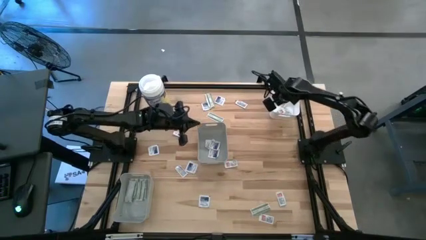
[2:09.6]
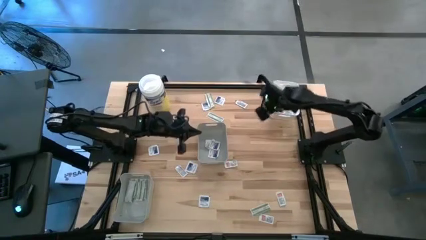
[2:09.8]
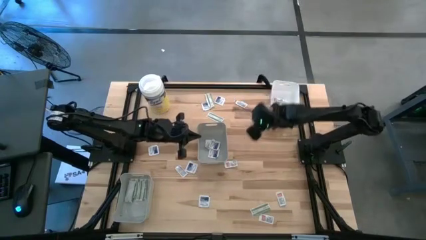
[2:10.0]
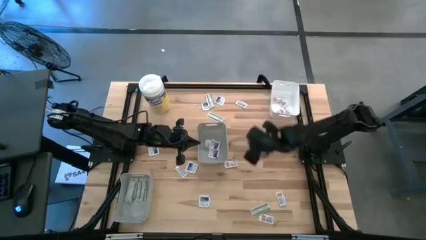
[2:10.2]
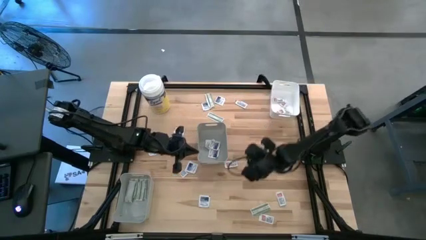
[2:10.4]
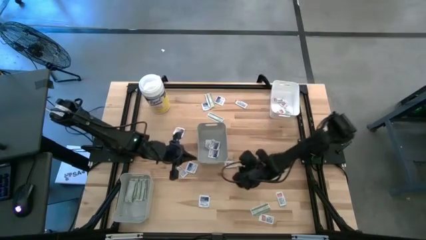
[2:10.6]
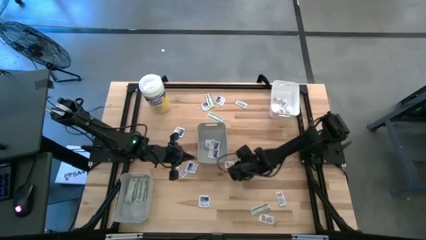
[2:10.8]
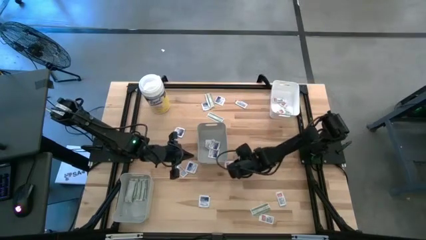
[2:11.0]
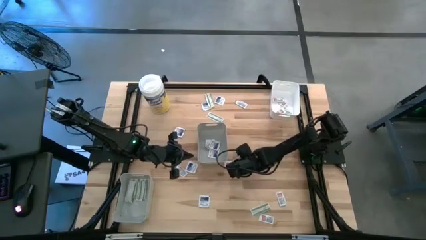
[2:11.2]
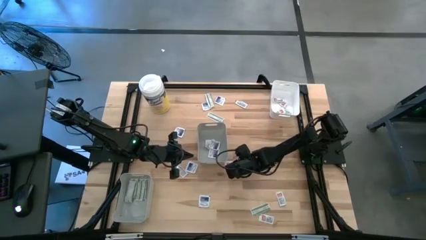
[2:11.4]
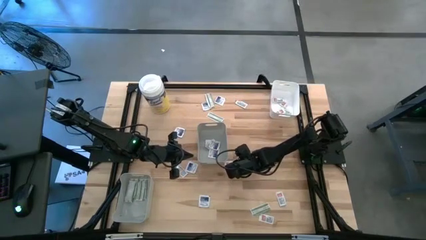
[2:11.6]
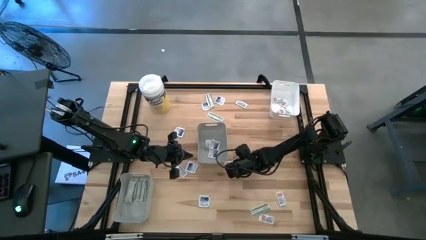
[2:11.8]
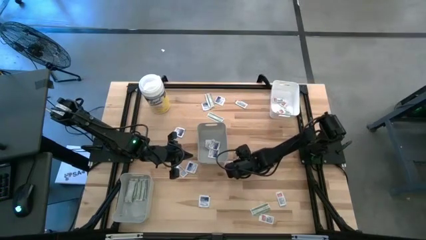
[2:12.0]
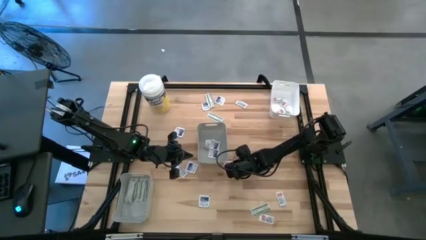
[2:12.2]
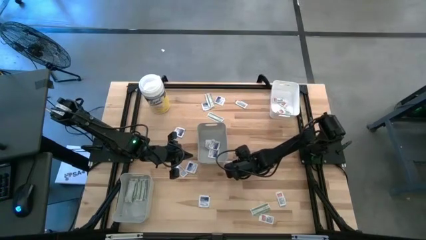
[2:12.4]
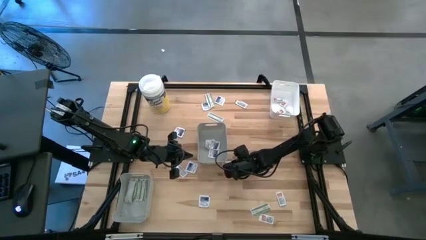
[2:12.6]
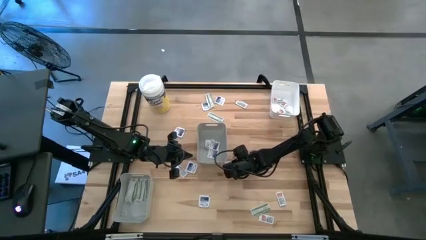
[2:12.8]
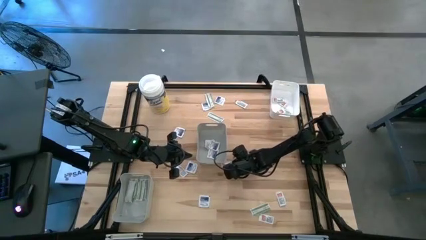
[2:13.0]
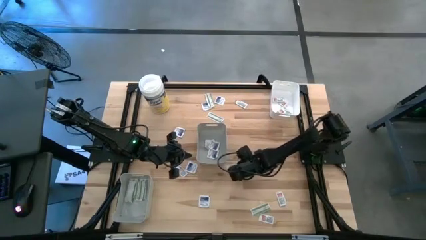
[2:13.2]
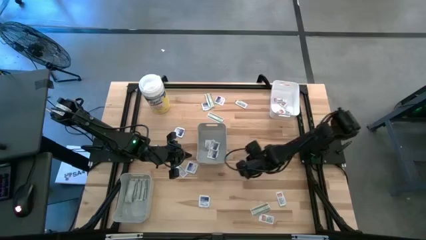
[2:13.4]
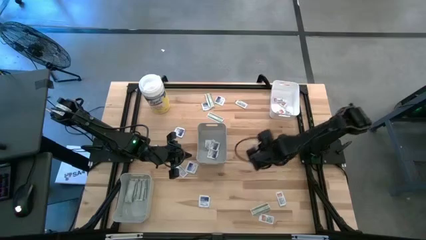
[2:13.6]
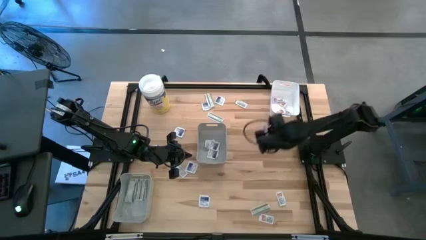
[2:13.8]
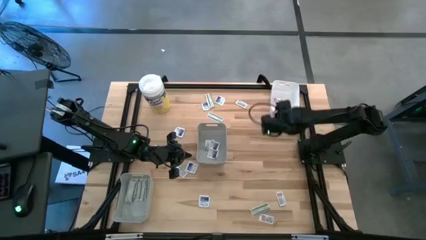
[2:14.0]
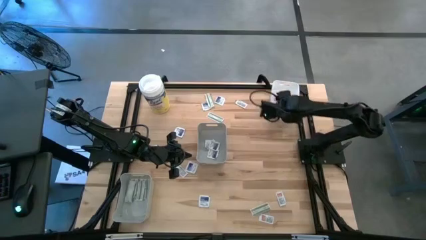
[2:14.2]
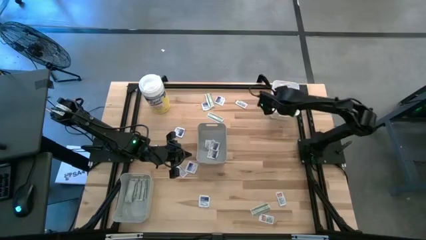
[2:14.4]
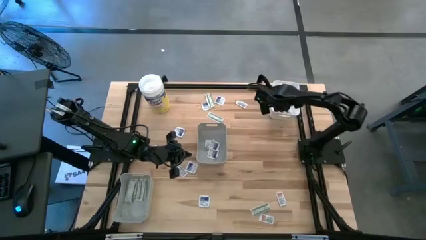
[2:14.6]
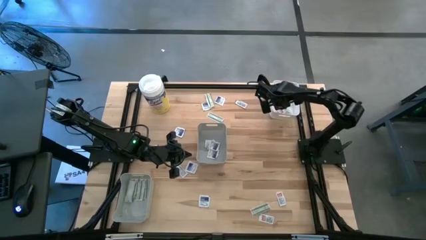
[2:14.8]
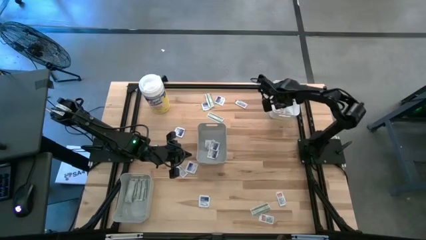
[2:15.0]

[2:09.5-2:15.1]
Task: Pick & Place First Aid Supplies
Put the orange pad into the white bin

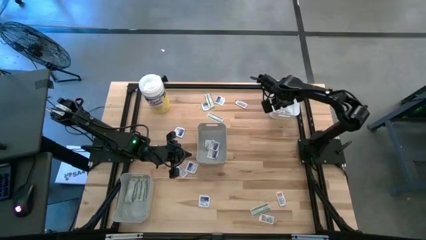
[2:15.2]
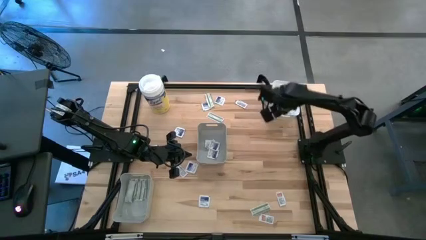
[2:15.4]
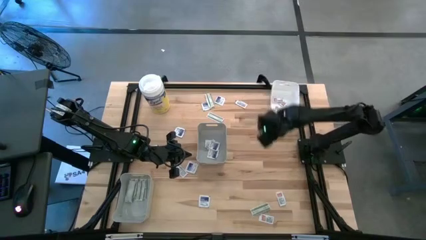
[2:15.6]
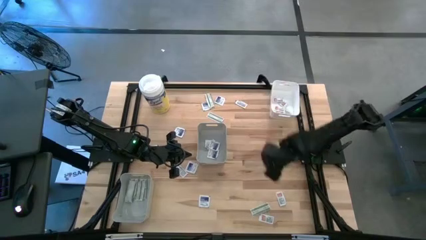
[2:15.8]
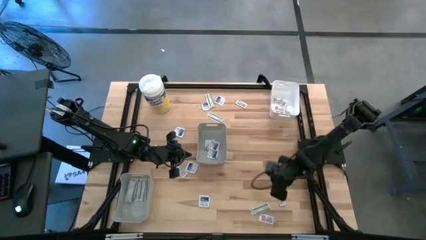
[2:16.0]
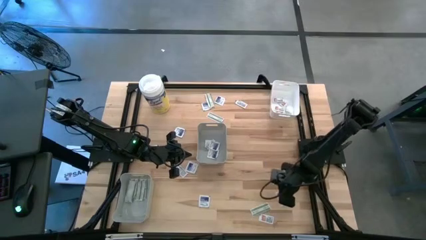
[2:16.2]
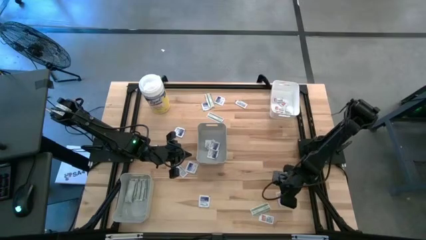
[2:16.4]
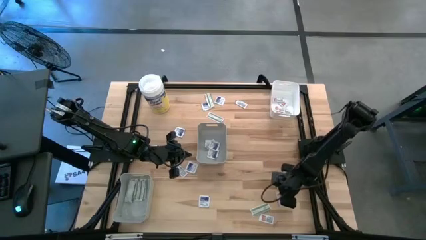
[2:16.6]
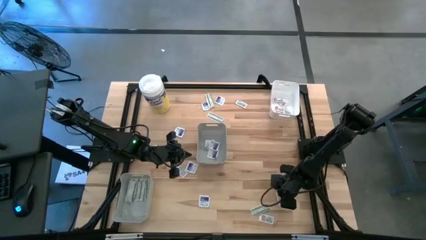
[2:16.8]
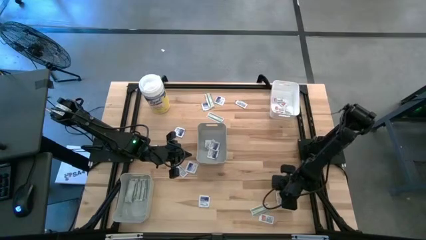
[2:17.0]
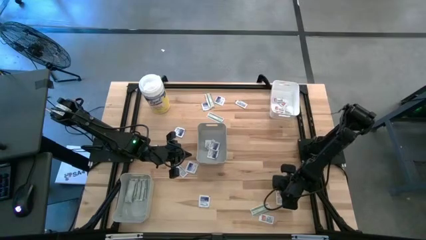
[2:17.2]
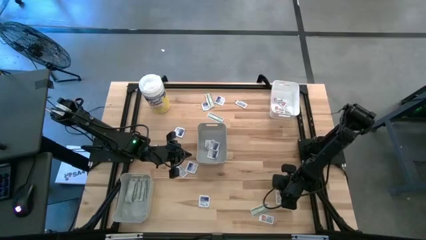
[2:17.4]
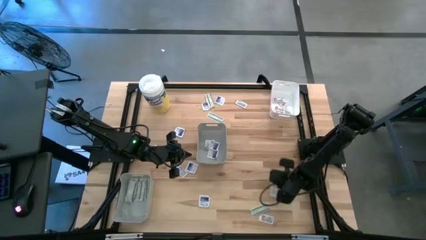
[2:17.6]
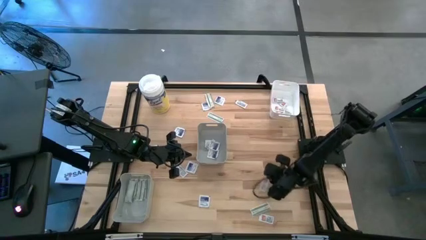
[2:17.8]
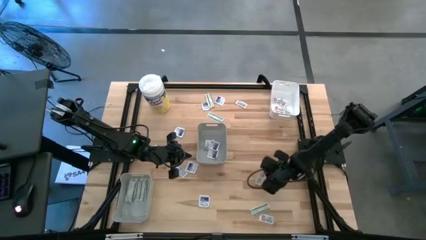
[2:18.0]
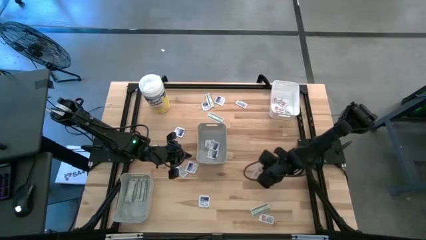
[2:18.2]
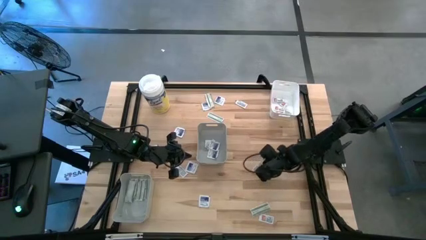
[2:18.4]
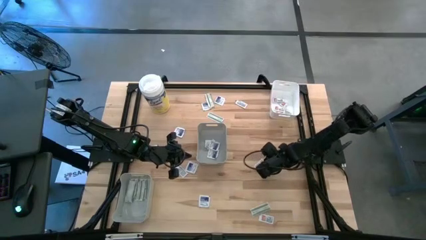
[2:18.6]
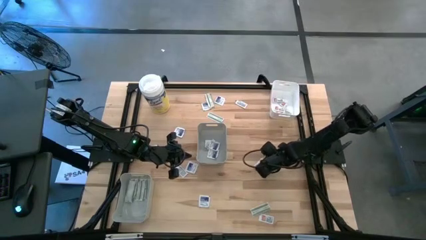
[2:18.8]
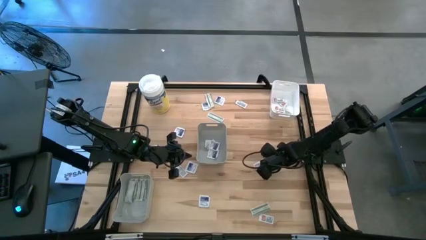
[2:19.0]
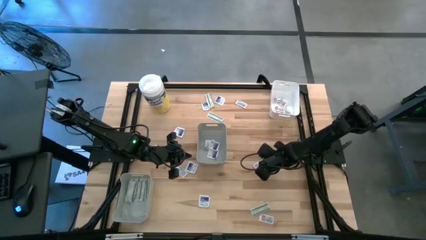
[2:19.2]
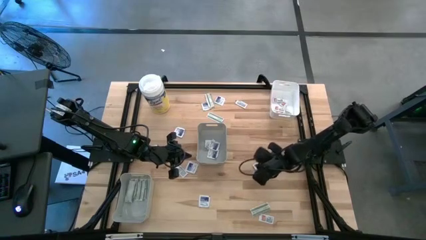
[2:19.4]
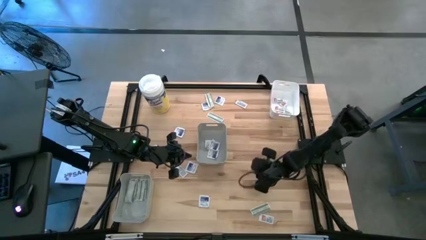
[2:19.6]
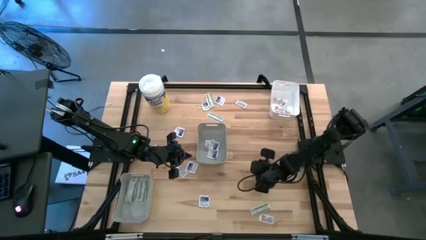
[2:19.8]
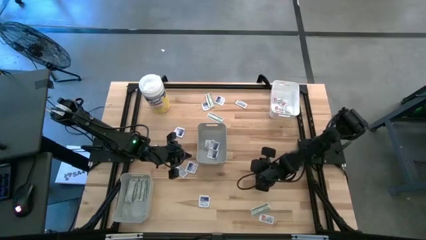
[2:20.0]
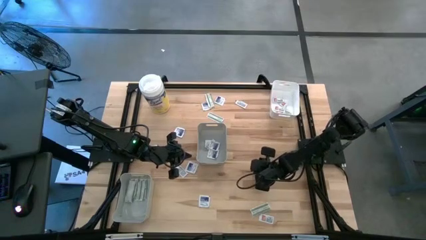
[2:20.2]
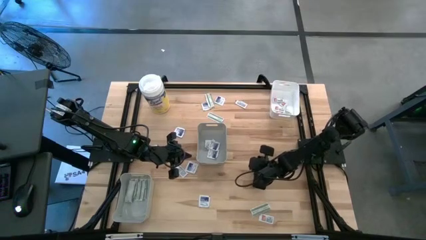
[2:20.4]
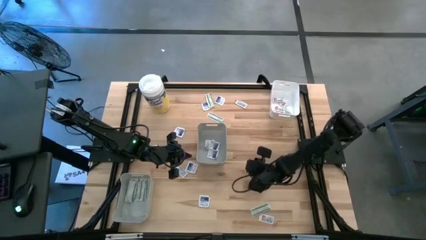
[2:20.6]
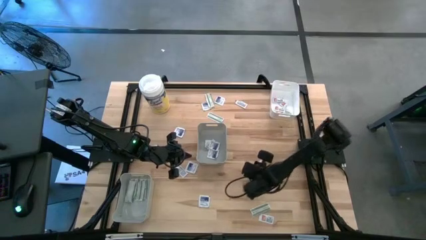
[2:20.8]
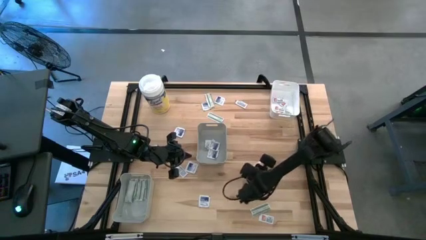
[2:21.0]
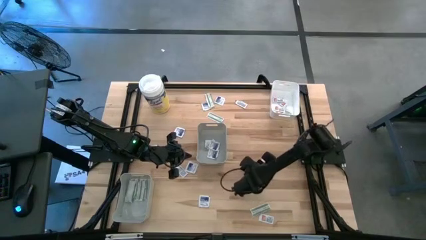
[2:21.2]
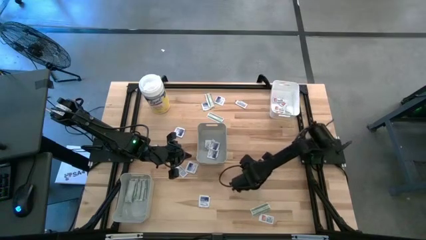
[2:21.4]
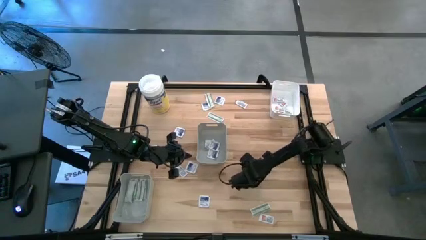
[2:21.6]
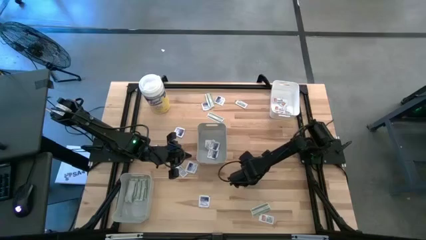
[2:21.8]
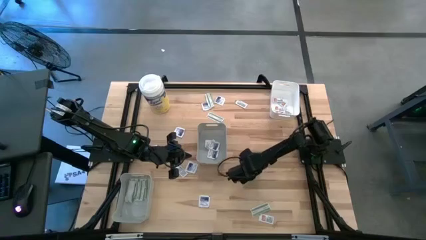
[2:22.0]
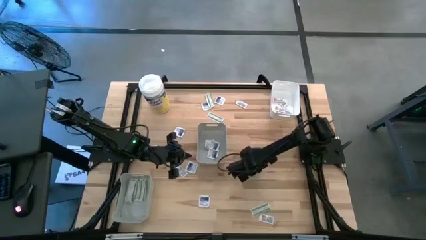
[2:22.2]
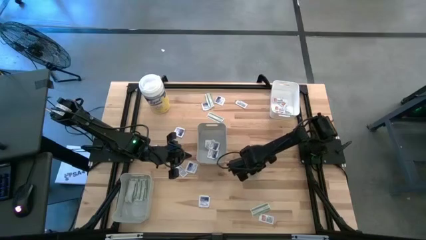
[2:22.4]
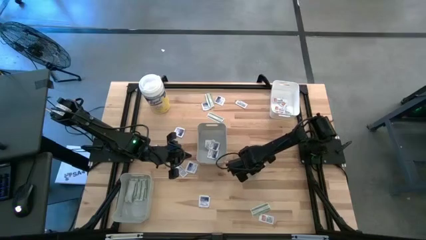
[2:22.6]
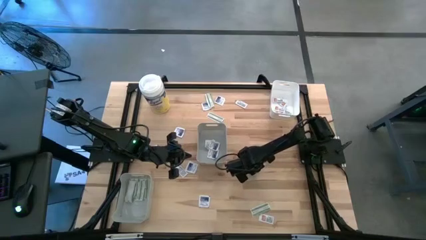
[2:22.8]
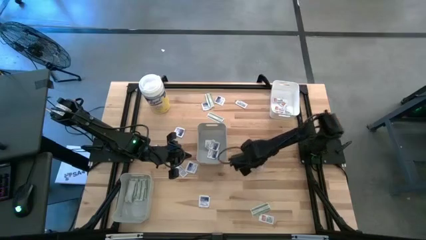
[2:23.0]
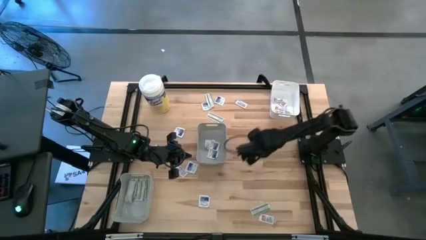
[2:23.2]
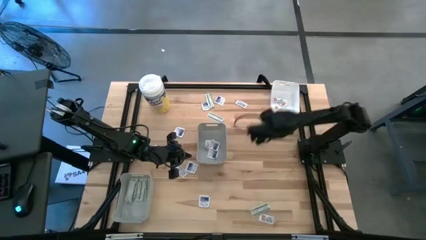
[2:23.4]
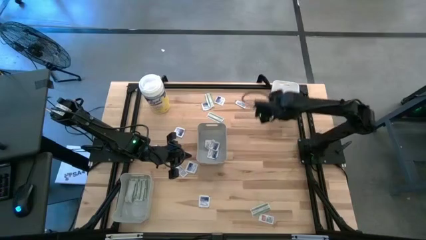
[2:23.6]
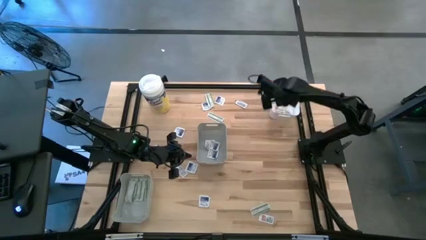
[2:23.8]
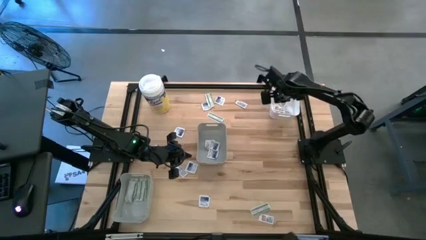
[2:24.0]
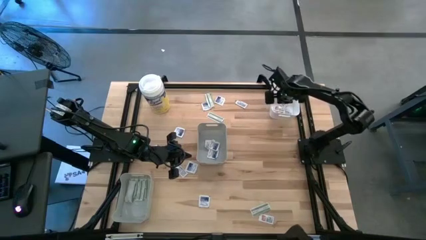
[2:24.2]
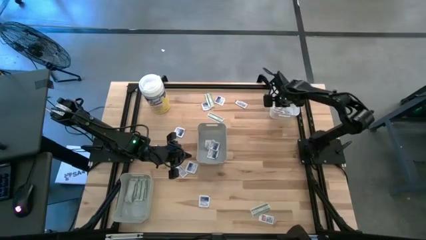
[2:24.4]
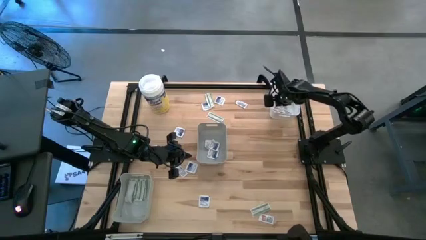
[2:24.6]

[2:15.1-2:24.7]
Put the orange pad into the white bin
